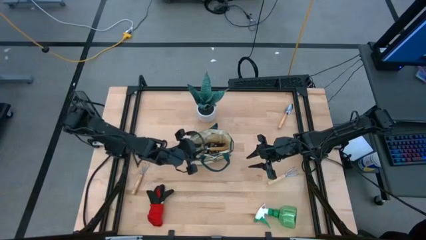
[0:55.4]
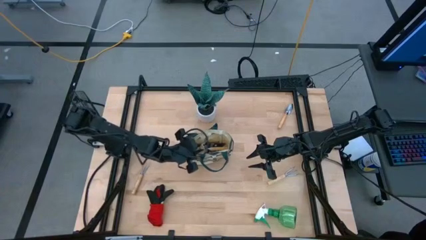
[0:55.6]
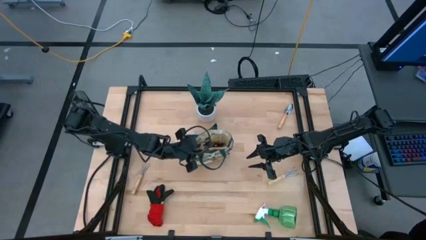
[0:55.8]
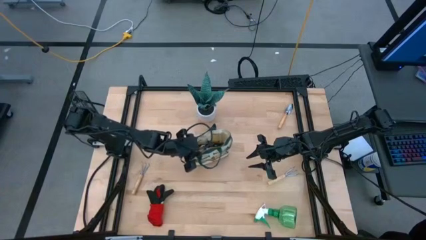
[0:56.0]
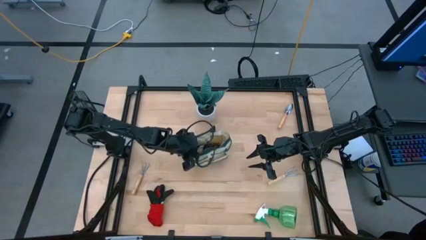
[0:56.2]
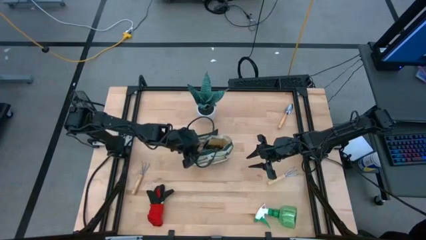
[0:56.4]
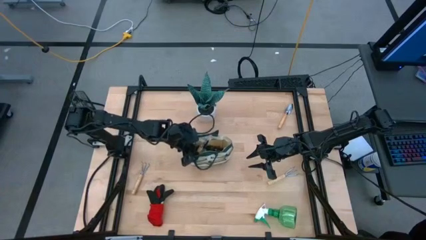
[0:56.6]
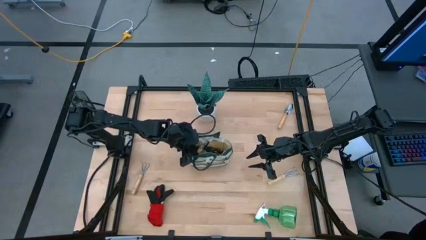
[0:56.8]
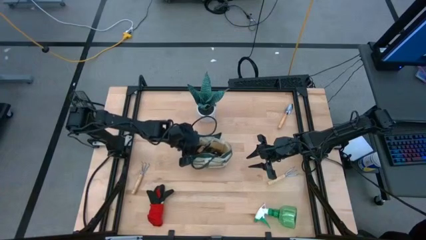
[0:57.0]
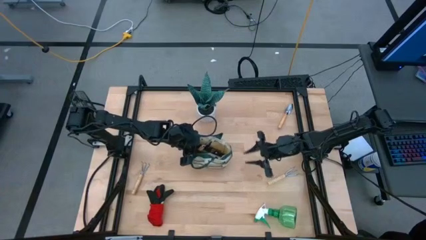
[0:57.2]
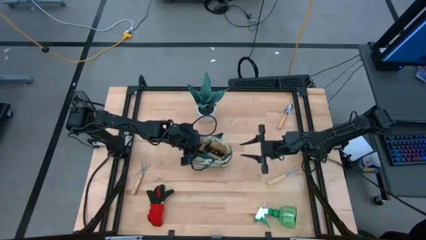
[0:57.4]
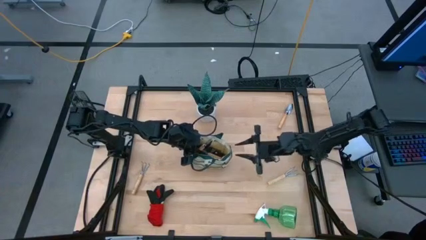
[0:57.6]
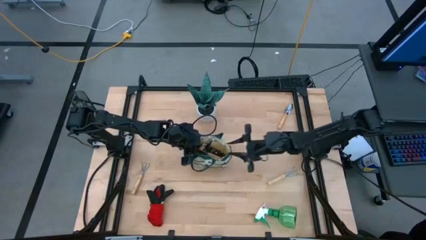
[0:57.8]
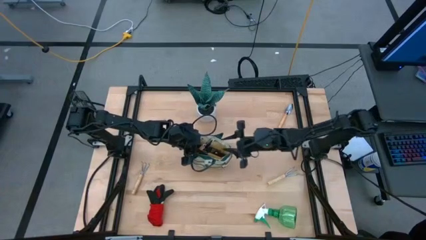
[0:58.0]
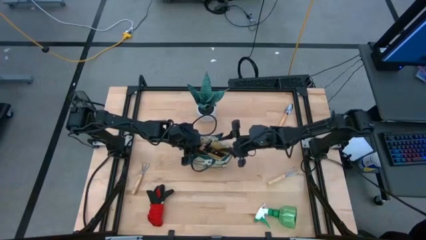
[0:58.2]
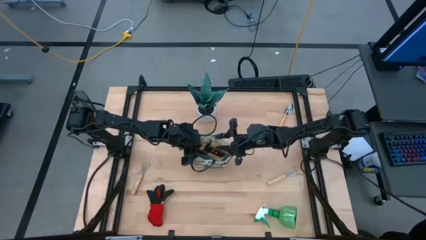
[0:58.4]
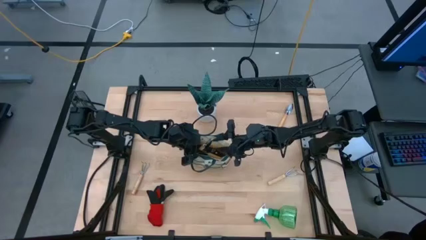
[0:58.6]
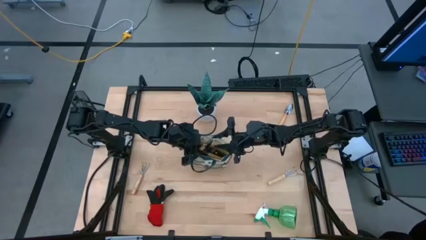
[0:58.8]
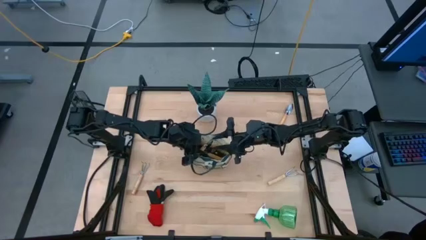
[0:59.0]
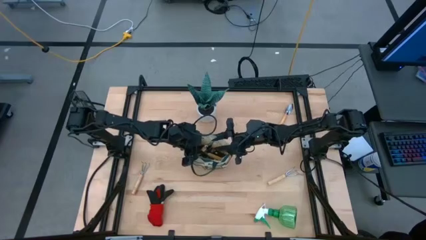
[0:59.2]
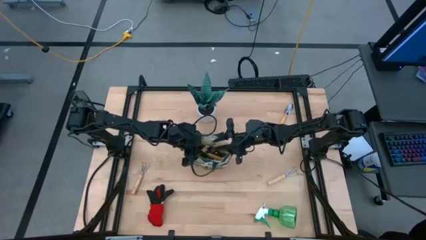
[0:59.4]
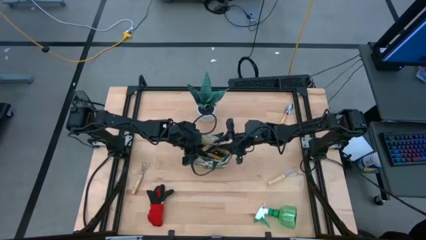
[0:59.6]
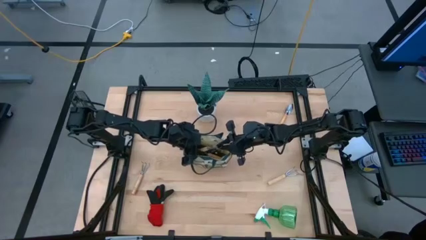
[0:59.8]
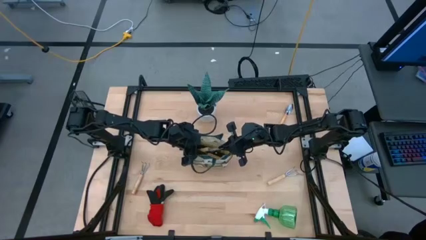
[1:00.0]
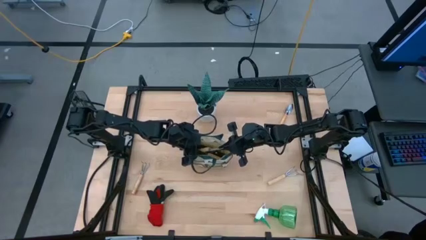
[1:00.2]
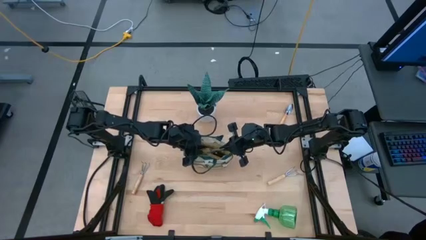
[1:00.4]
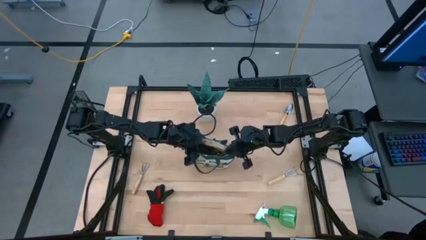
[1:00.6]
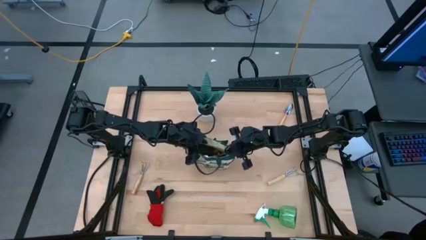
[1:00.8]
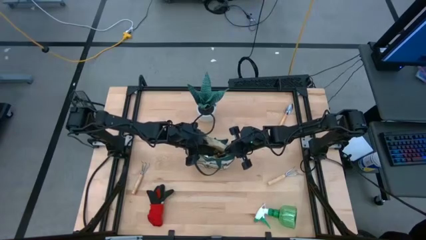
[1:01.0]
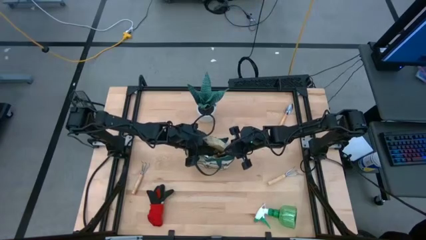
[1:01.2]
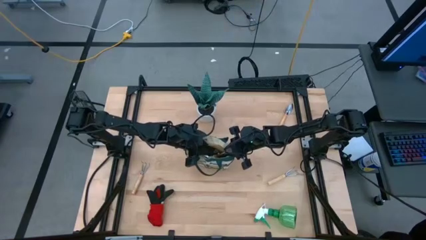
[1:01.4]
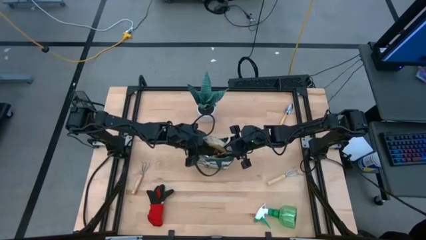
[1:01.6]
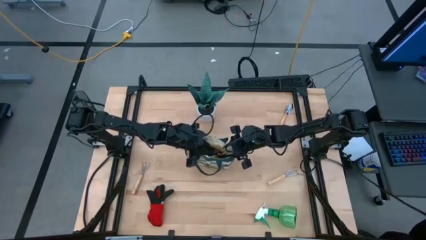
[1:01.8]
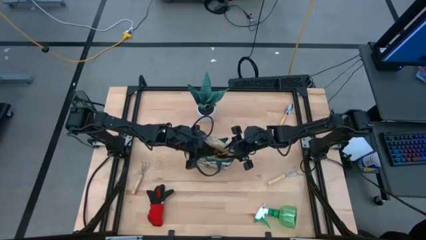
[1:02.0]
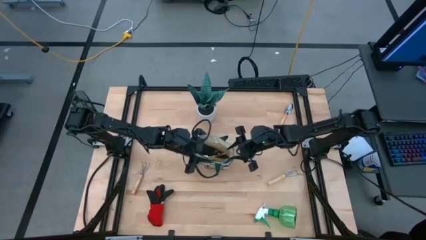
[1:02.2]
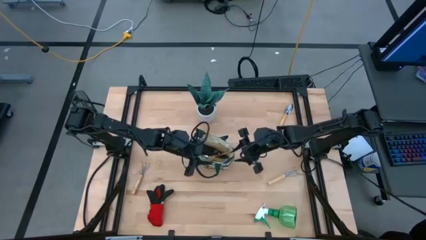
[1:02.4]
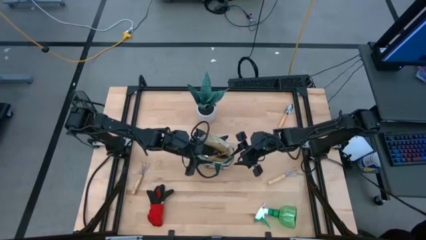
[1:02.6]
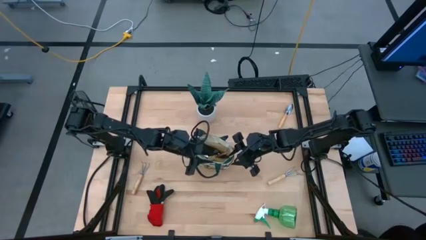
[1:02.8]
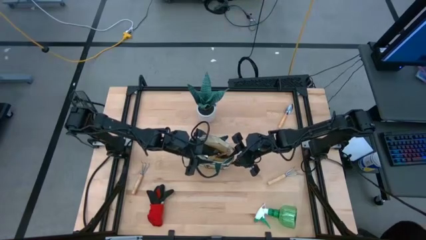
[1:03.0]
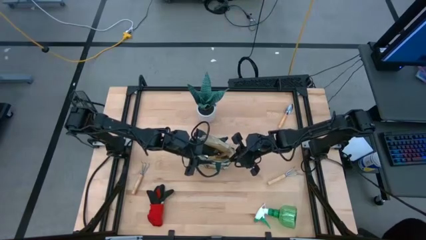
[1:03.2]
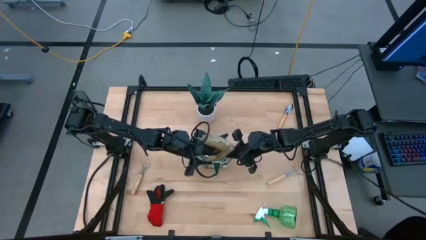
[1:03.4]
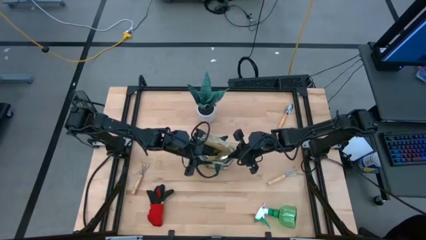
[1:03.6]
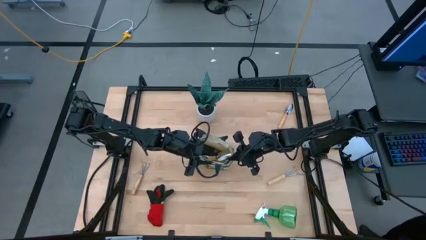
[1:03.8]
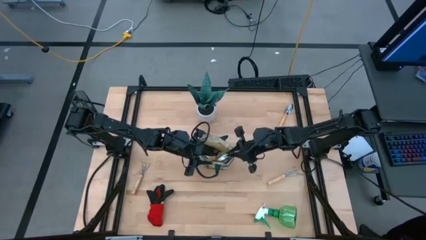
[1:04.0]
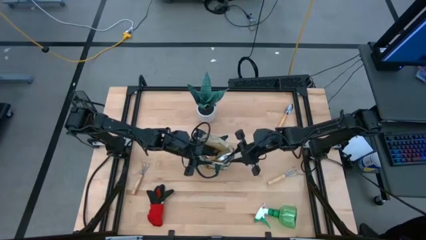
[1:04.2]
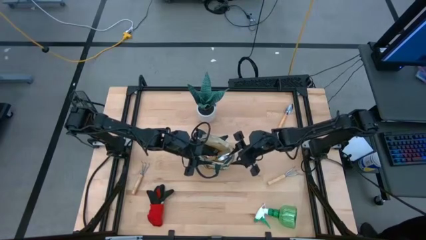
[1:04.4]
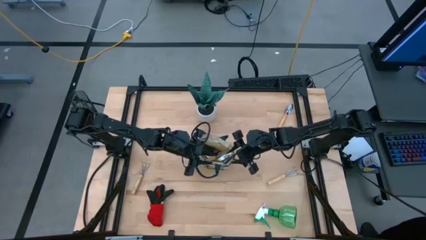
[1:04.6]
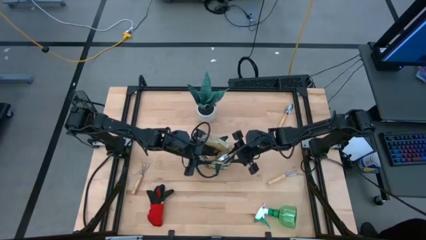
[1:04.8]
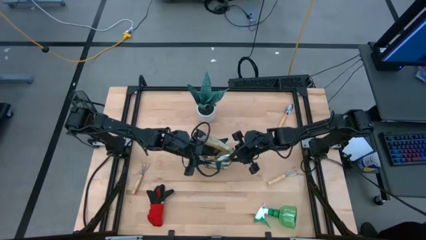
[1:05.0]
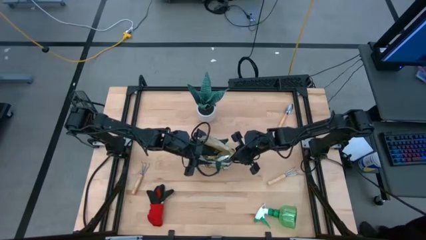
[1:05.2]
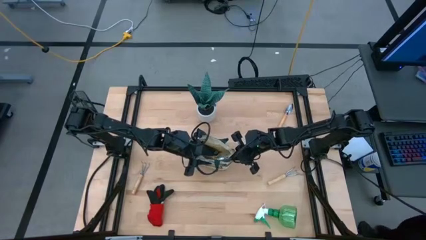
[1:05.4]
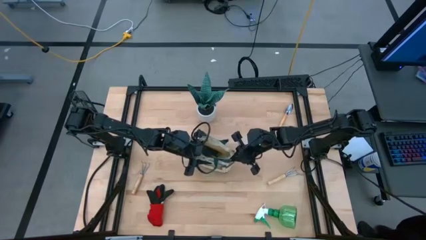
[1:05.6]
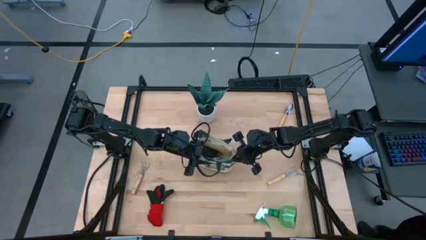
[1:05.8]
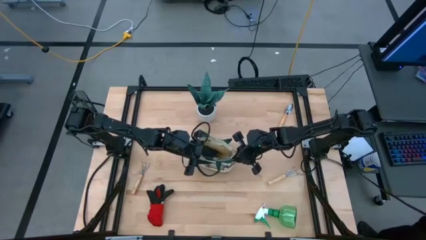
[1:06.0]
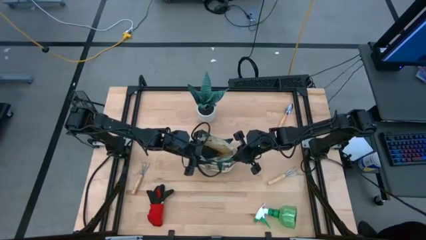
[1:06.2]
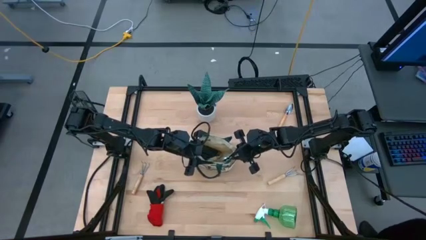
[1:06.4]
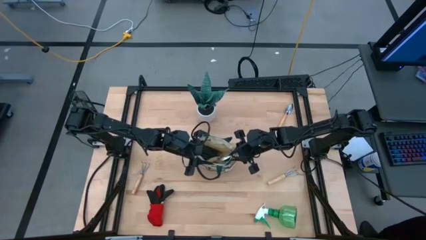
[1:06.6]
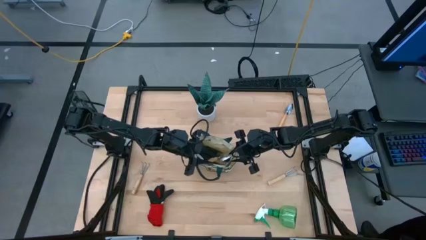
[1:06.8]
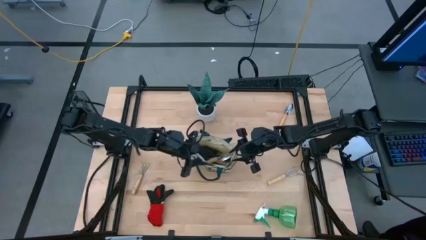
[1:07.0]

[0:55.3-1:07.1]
Task: Pick & Place Garden tools in Gardening bag
Put the left trowel into the gardening bag
